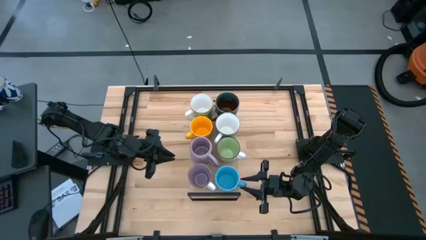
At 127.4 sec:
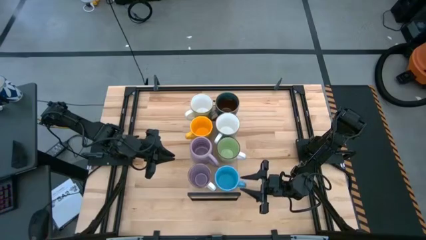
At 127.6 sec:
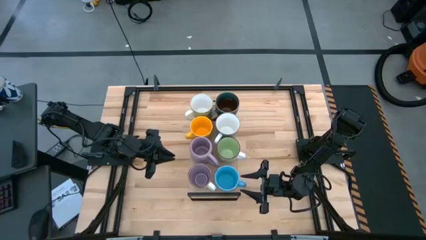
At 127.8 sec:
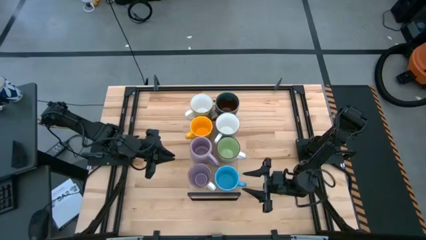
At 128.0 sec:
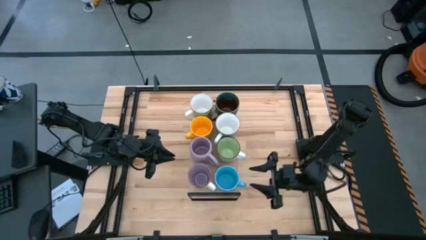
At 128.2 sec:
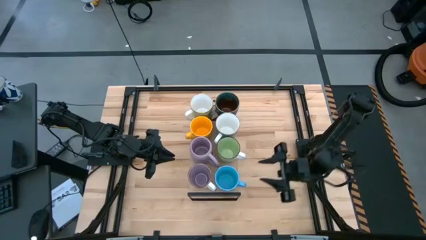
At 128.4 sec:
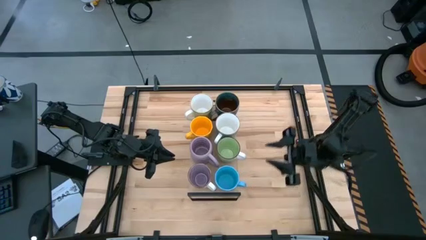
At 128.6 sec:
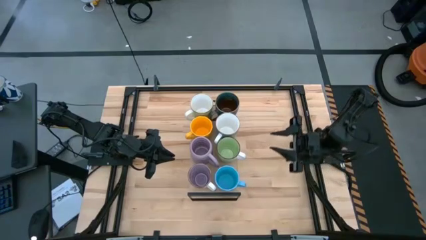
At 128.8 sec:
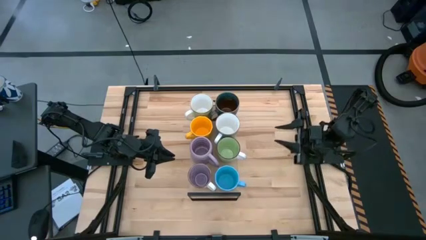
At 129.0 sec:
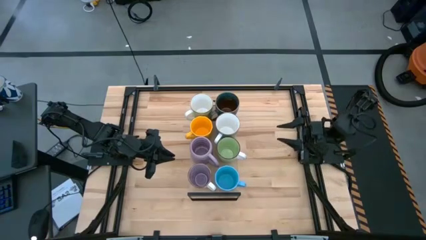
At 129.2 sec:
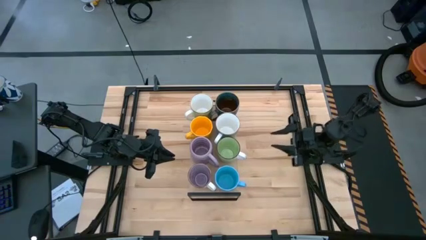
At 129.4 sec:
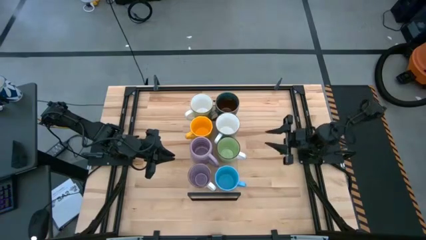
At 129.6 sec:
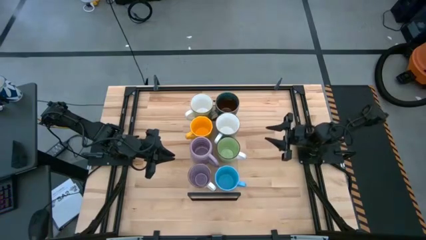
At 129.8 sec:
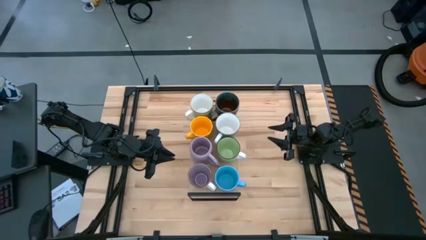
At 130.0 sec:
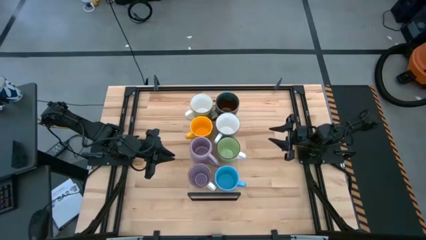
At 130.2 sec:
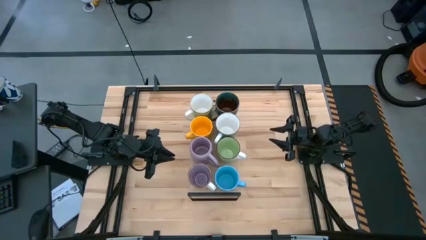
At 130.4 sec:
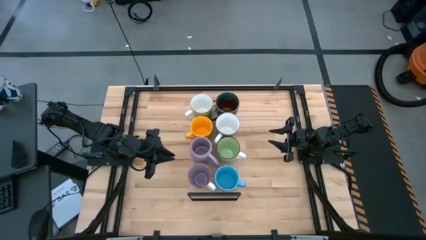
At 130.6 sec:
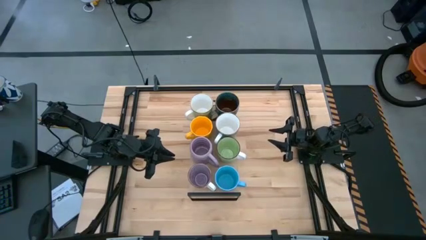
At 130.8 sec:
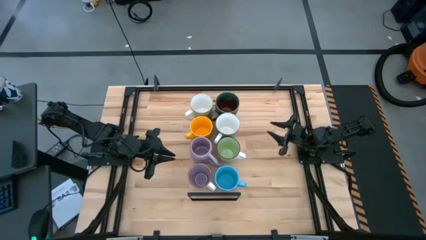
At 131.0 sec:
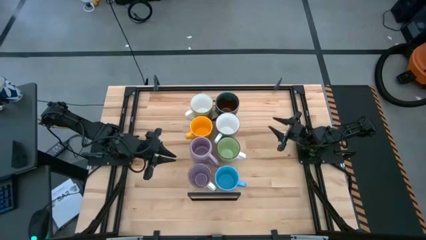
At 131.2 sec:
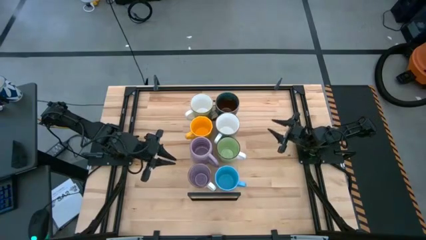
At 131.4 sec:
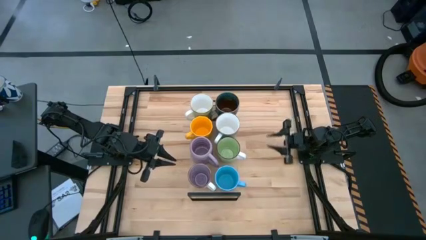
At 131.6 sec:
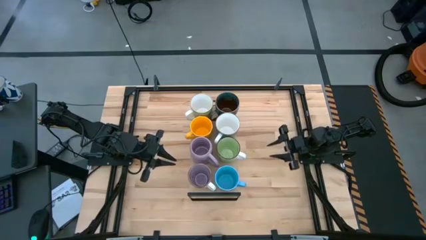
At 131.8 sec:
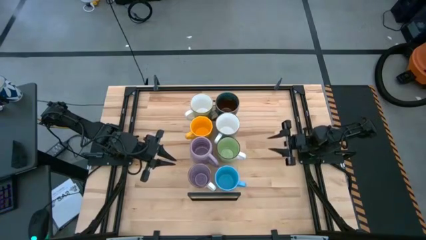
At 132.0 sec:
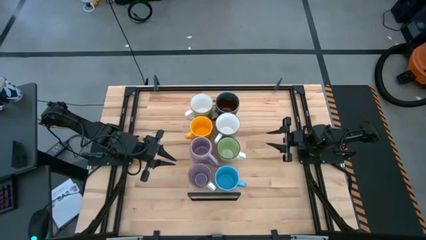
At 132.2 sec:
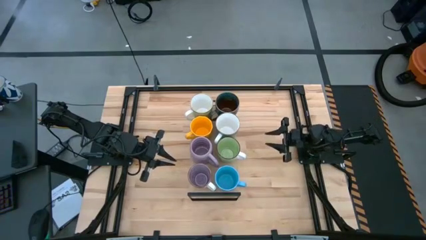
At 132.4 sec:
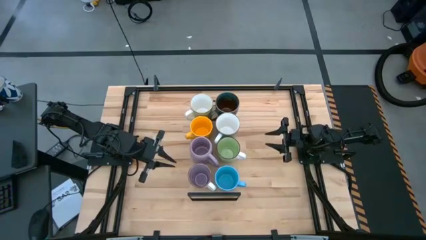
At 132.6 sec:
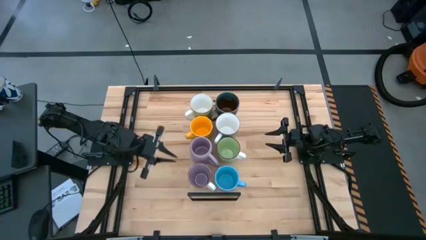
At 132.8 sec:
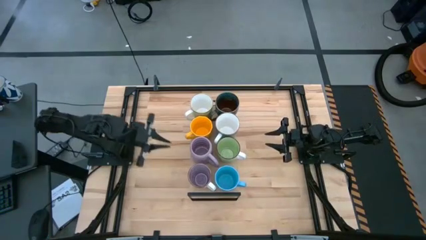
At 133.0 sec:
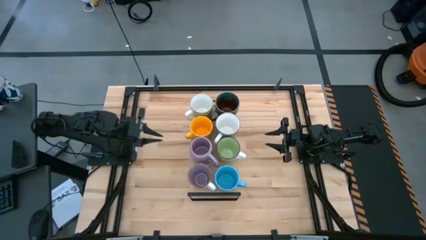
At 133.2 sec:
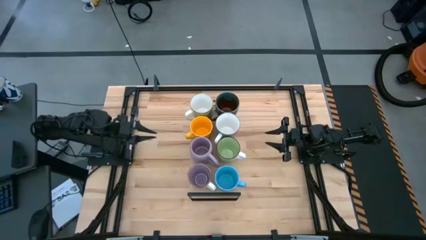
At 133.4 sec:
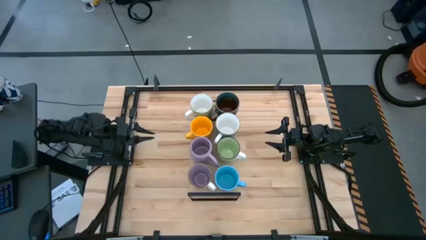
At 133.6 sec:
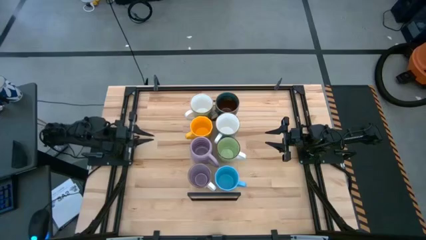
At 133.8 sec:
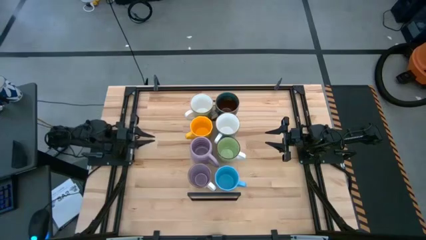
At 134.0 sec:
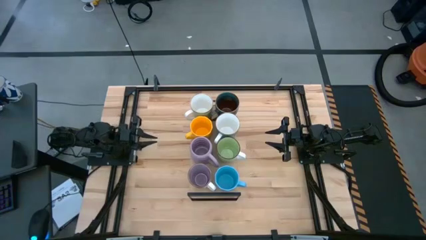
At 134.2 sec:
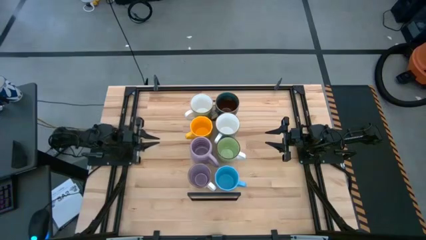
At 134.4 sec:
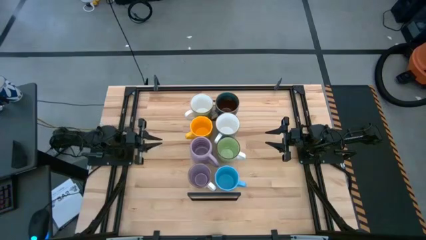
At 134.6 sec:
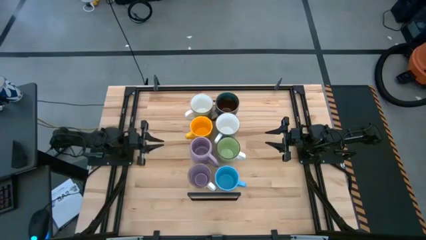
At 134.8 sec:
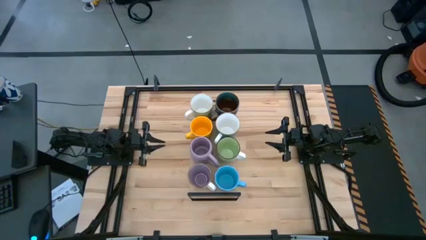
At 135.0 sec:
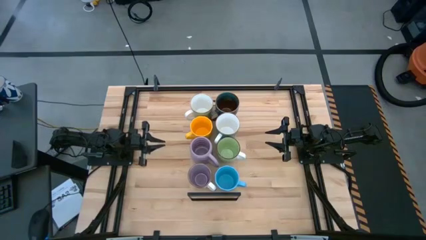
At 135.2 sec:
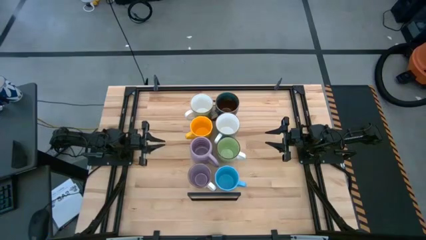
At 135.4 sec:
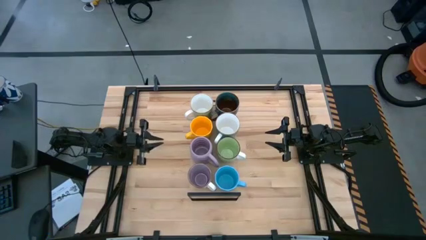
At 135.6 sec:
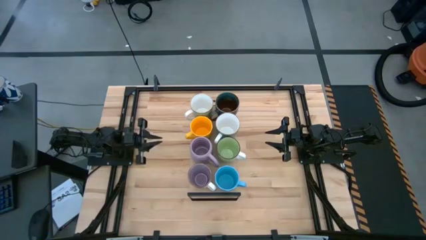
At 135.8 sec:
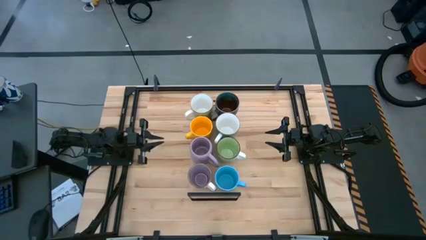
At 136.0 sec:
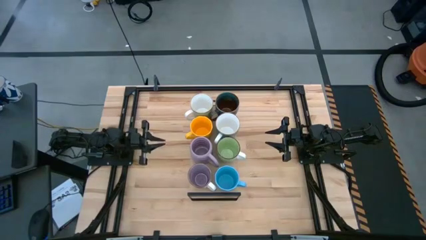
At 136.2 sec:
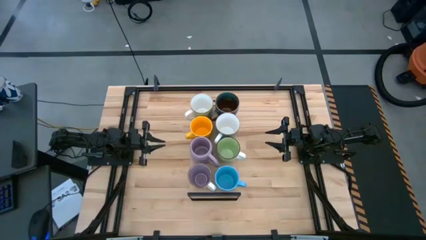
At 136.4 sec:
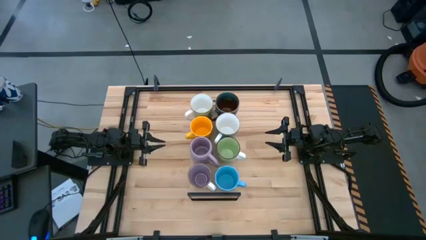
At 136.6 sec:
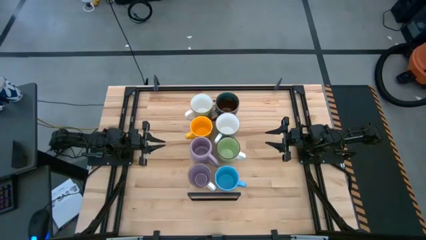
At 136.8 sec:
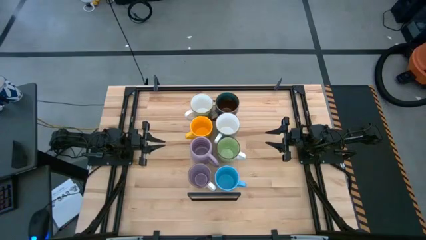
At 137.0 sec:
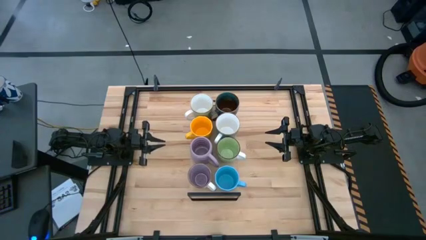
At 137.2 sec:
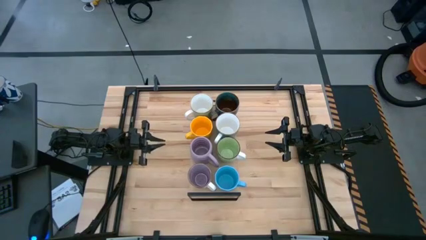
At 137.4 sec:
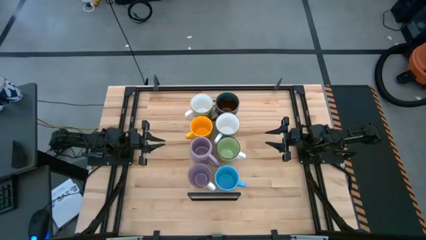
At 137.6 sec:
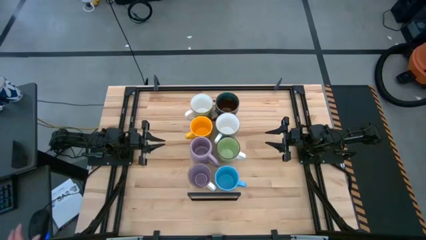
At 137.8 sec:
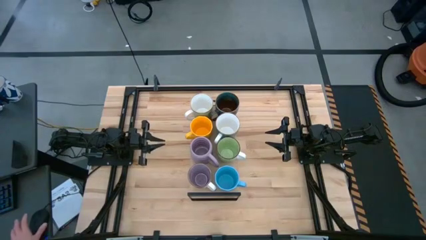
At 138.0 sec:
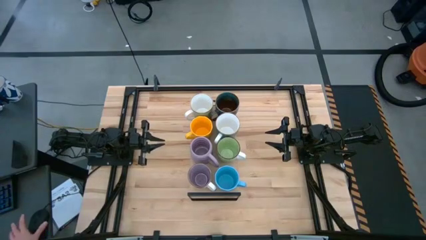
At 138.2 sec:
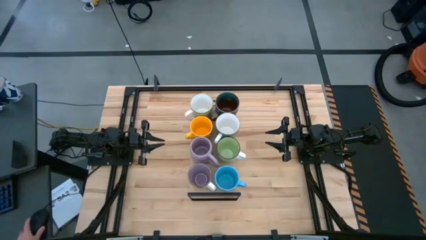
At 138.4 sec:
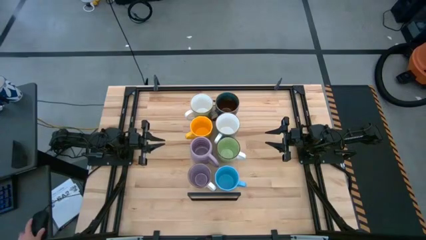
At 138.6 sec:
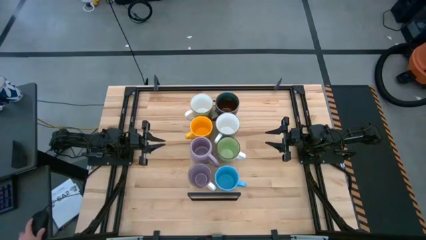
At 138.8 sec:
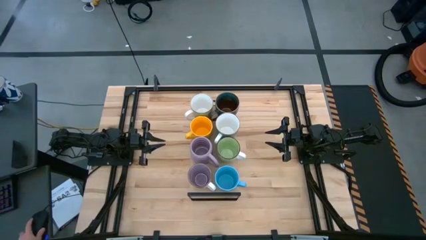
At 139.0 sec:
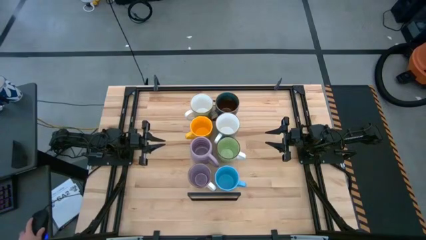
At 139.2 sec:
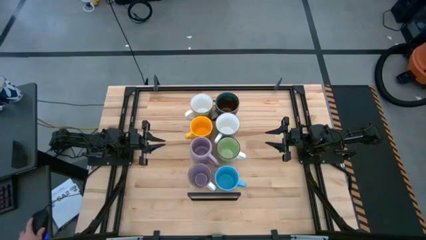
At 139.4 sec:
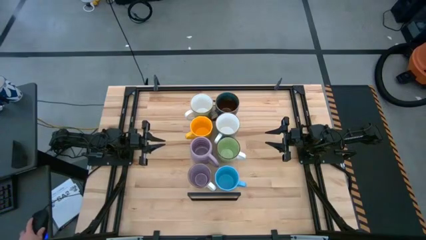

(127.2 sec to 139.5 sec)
Task: Place coffee mugs
Return to Home Position
